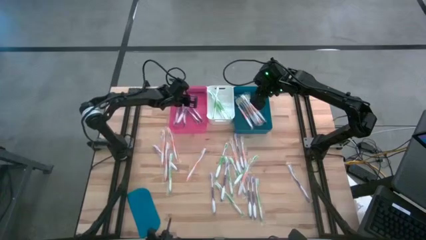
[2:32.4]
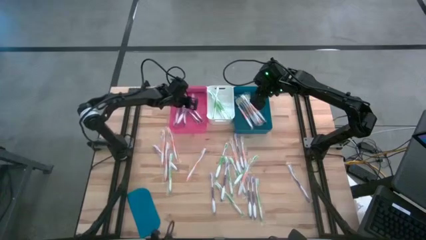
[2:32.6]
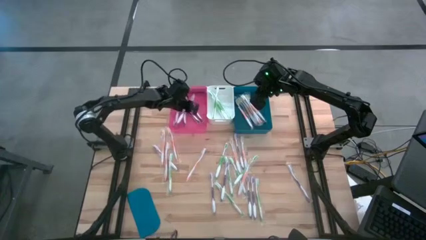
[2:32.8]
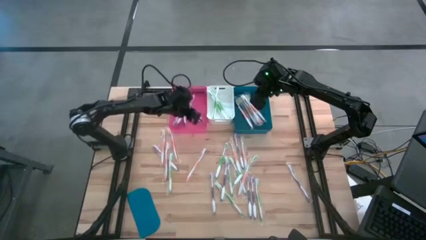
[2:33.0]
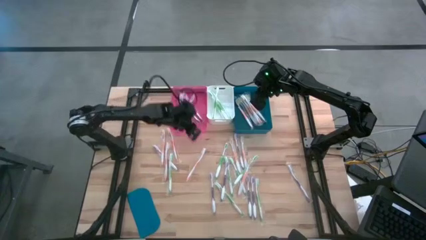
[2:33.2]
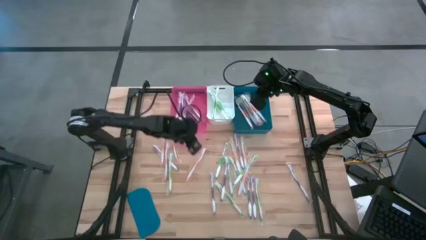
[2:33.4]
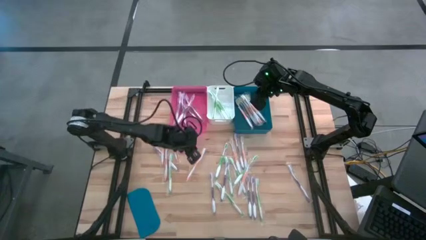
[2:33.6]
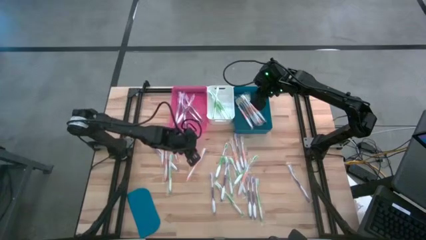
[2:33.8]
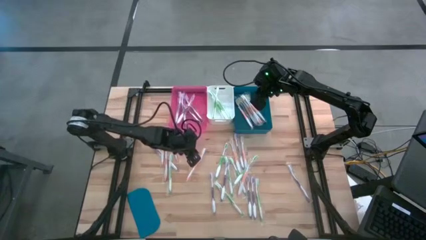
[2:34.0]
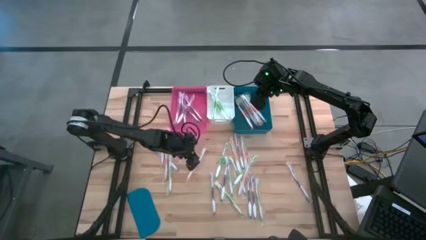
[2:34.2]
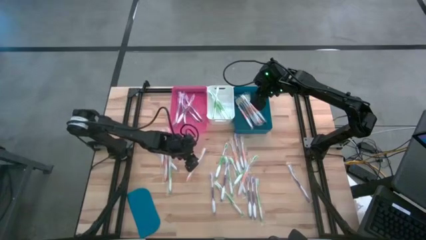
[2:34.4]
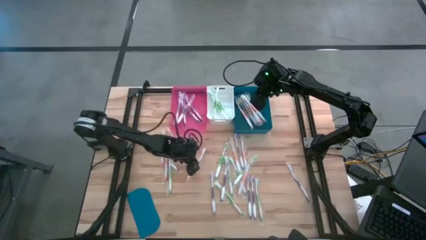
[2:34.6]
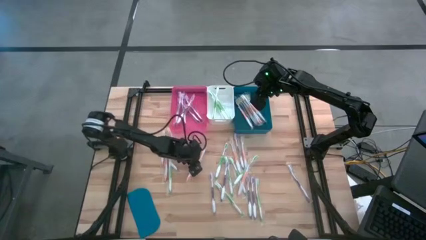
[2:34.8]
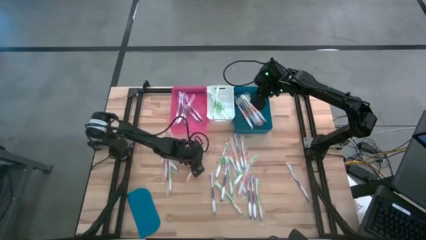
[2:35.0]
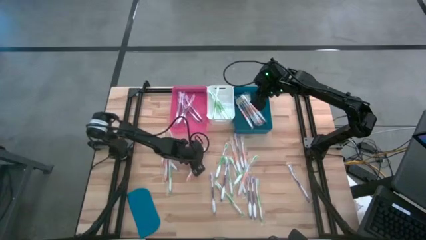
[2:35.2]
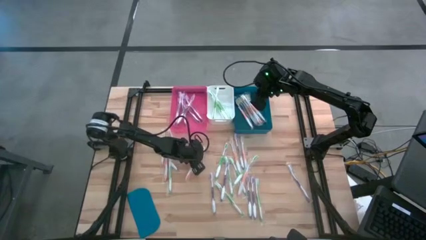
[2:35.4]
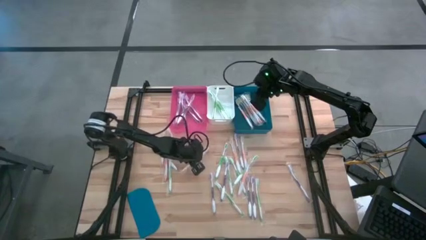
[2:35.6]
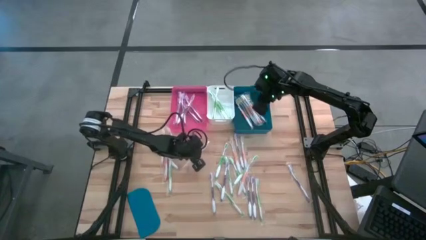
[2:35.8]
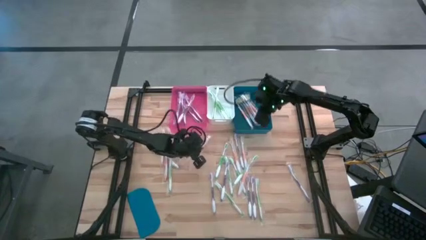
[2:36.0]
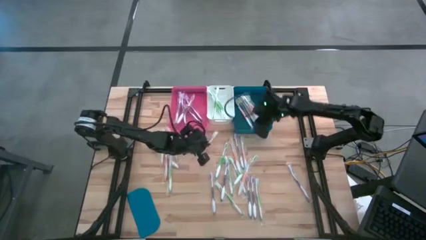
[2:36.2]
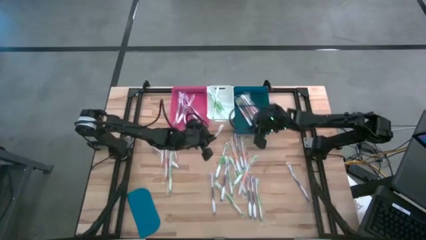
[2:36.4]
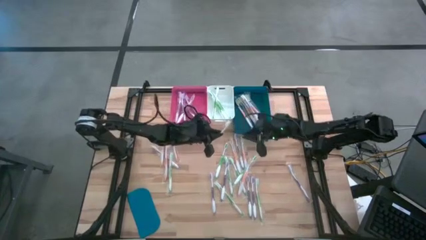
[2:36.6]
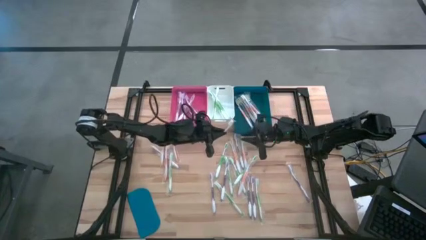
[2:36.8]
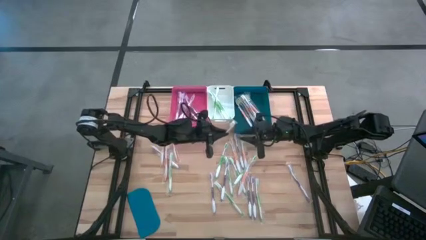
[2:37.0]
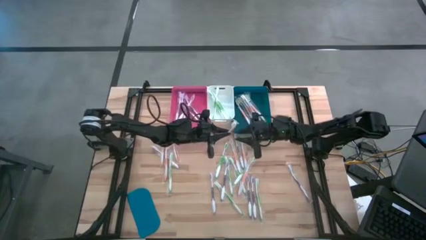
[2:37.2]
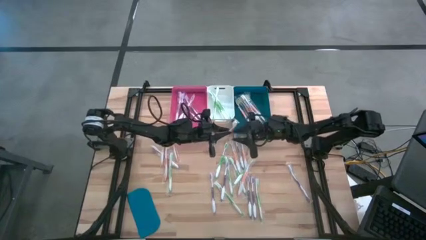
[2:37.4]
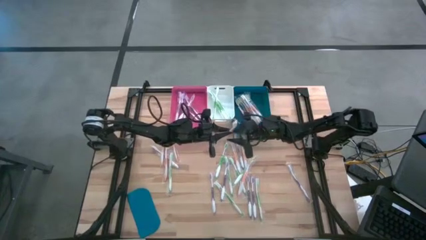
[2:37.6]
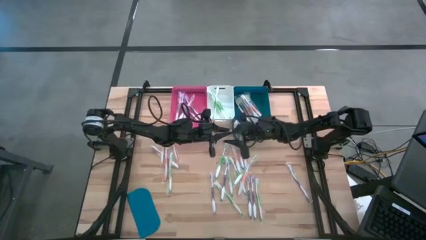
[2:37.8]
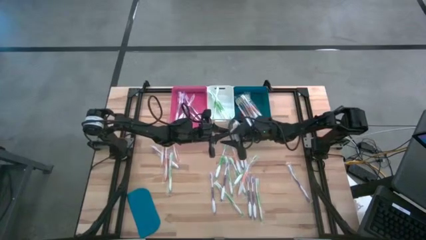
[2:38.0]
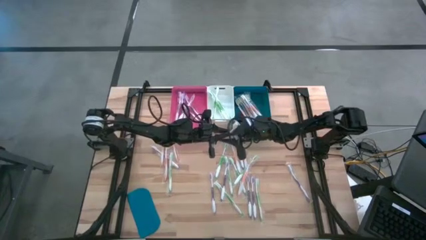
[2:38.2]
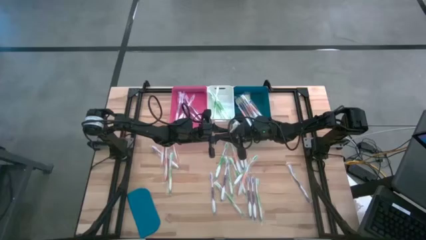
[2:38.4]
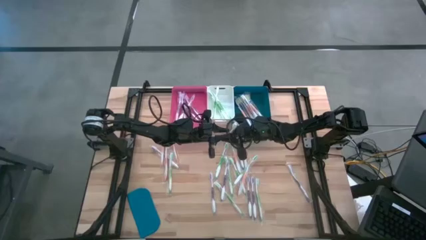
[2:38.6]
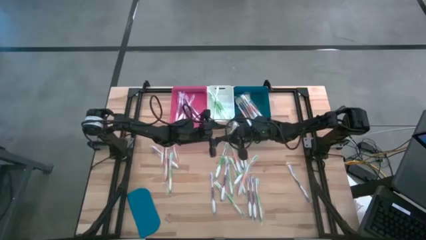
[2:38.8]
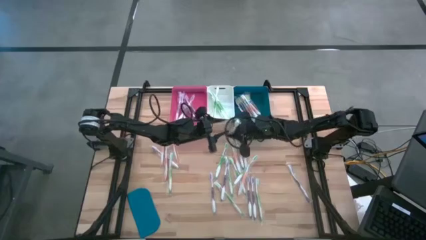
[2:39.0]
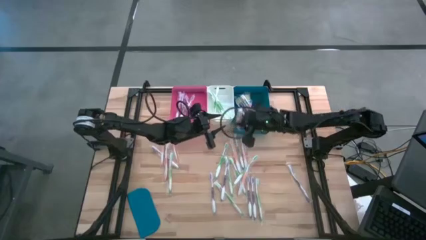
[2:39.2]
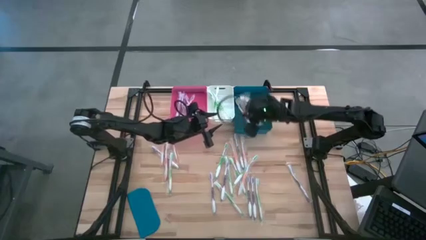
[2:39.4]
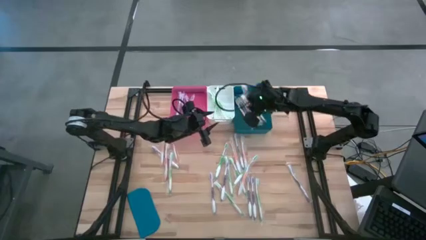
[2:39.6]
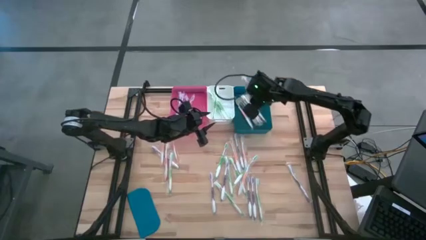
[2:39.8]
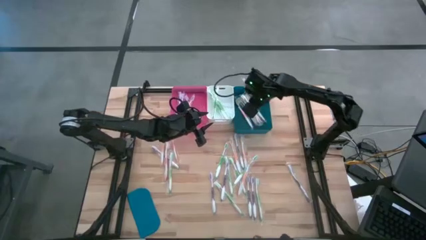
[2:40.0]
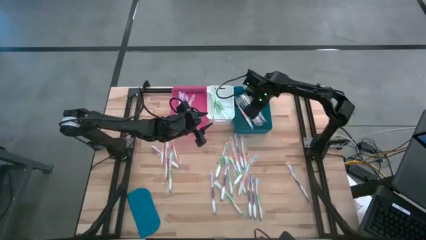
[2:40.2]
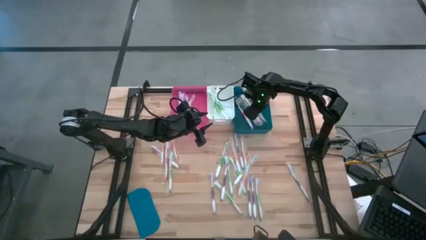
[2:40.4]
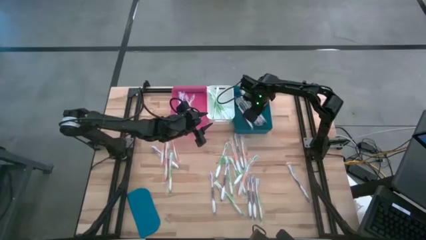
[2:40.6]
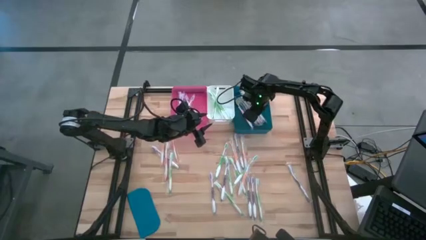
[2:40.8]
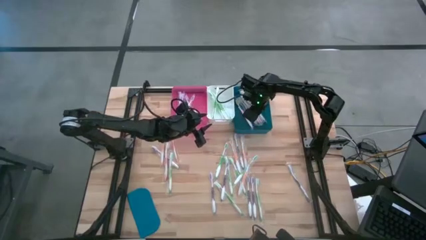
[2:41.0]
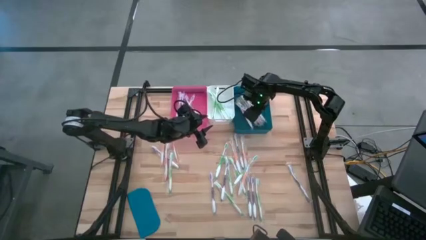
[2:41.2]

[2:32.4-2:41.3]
Task: Pick & Place Toothbrushes
Put the orange toothbrush into the blue bin

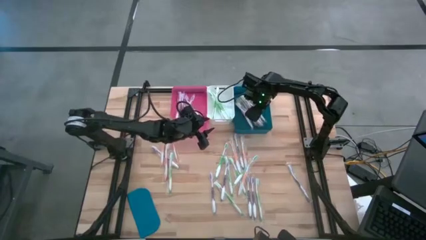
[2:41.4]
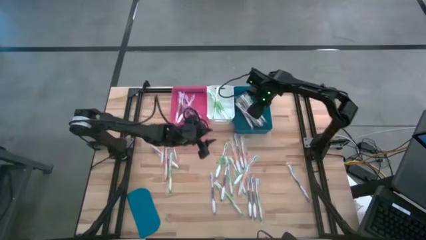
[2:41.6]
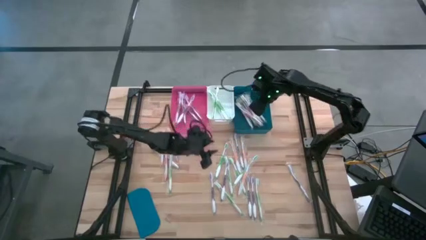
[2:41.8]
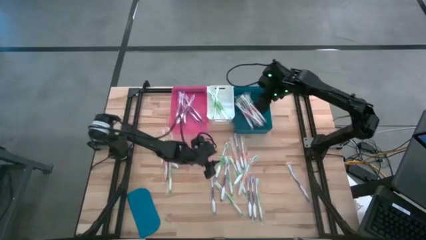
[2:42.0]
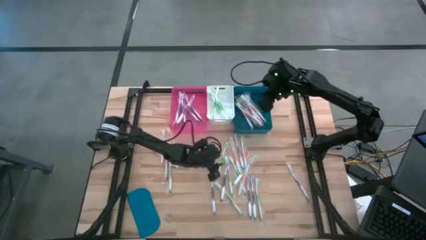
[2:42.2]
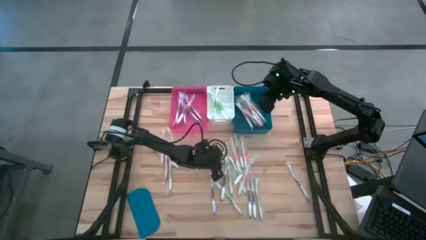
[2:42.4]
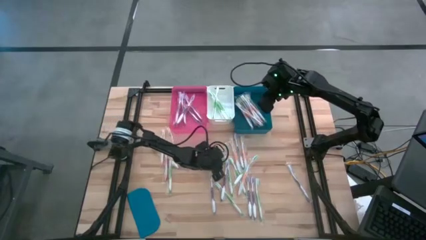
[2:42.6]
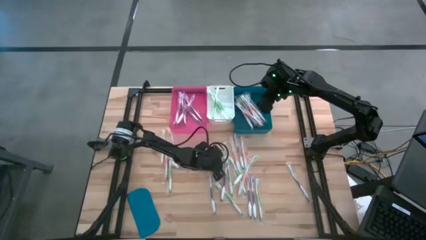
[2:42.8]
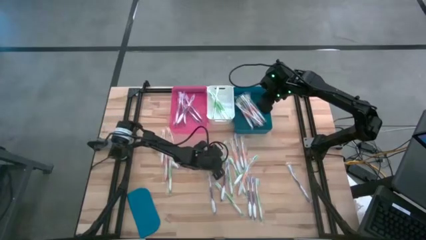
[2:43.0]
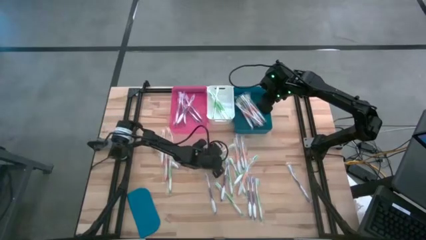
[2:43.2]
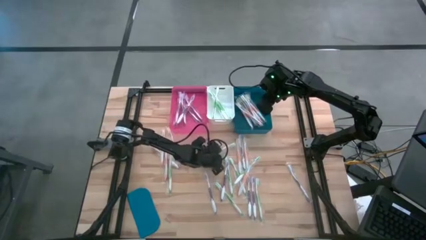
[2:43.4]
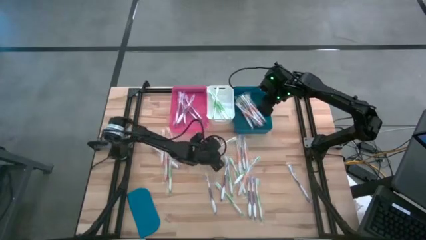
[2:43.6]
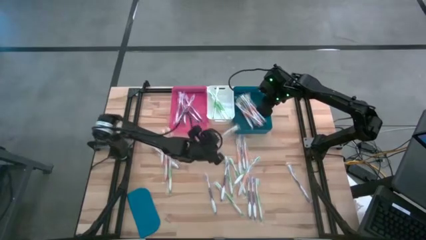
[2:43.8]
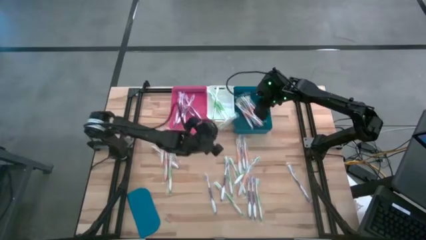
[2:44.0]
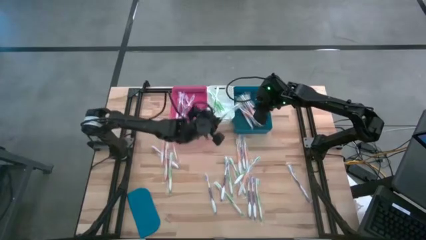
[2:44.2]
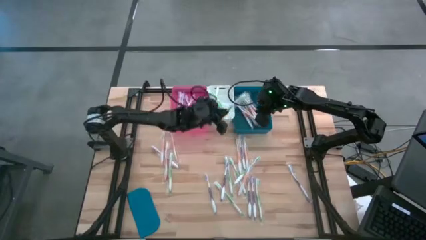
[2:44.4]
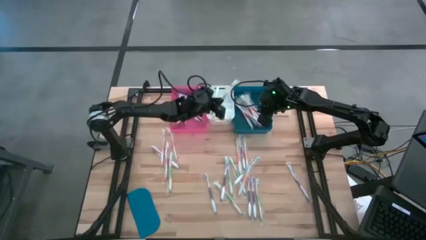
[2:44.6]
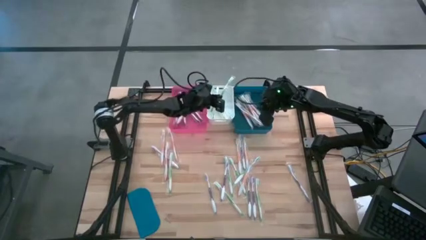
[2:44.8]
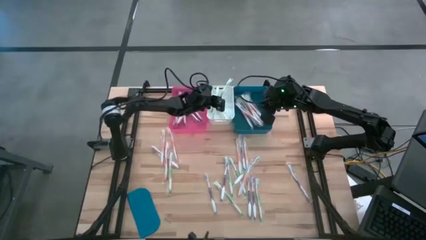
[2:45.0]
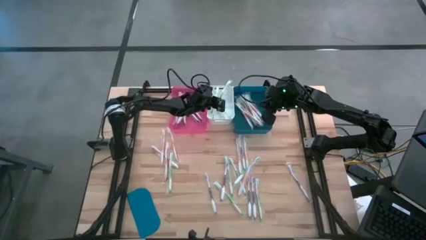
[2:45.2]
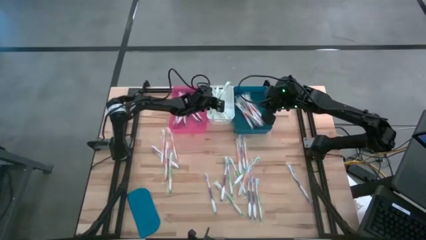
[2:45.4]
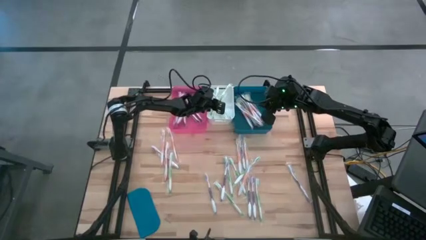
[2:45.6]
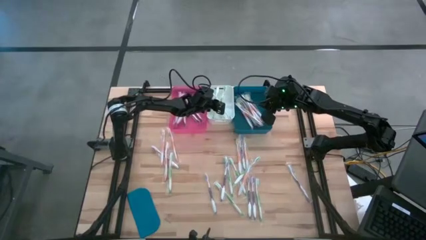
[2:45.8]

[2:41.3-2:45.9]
Put the green toothbrush into the white bin
